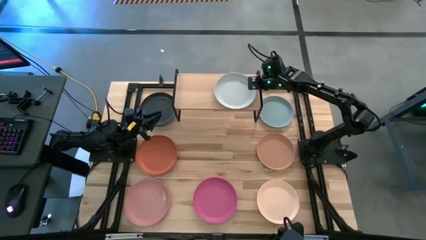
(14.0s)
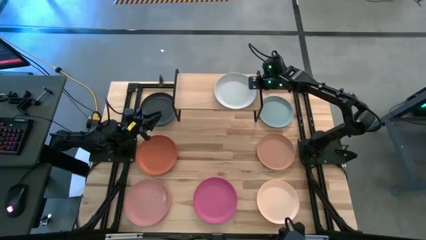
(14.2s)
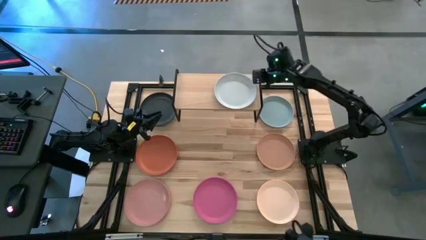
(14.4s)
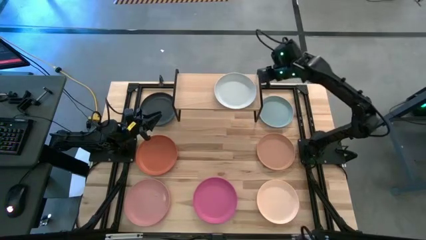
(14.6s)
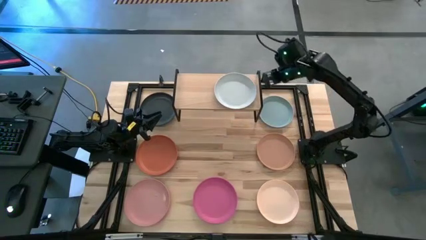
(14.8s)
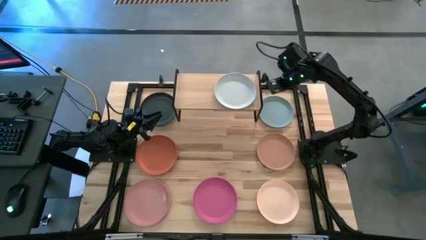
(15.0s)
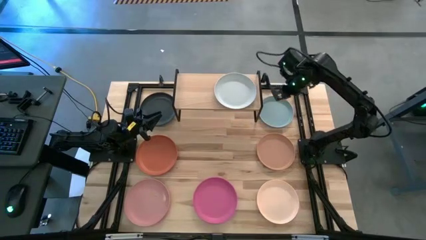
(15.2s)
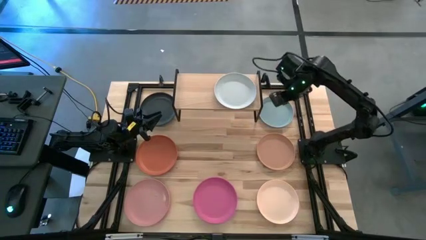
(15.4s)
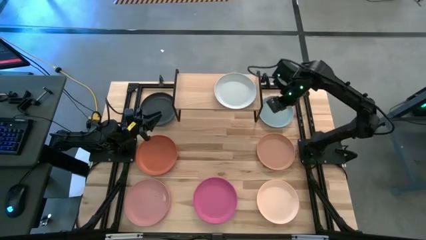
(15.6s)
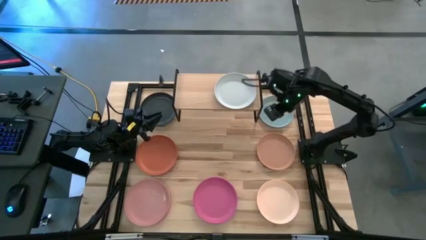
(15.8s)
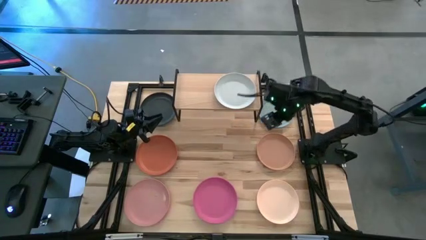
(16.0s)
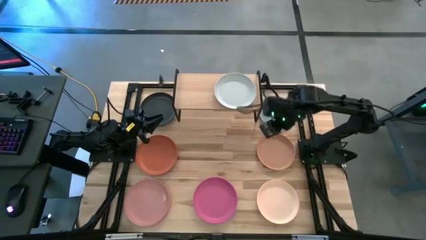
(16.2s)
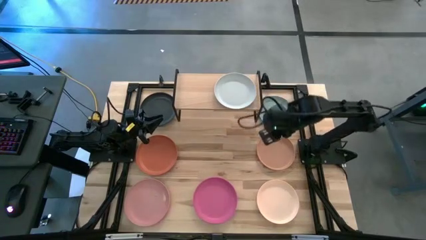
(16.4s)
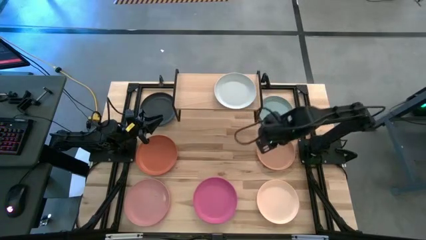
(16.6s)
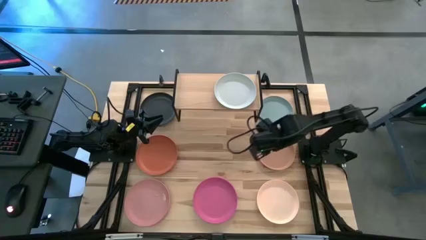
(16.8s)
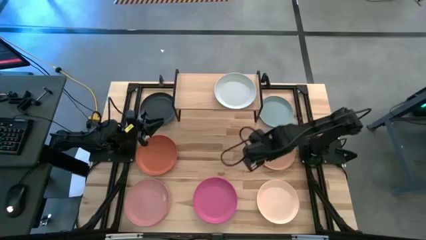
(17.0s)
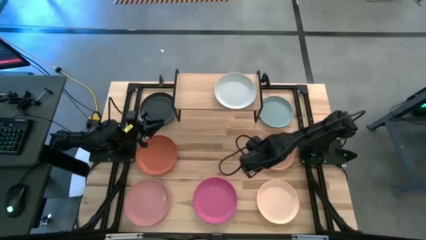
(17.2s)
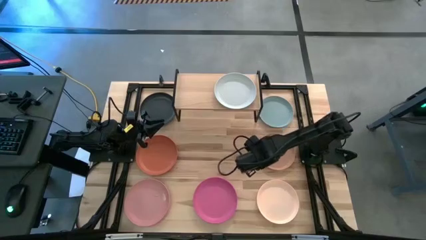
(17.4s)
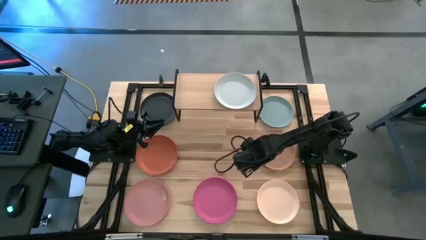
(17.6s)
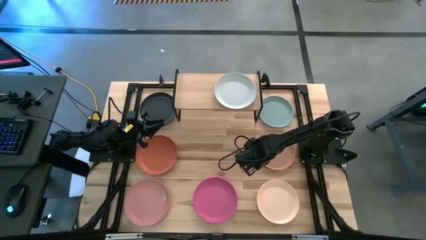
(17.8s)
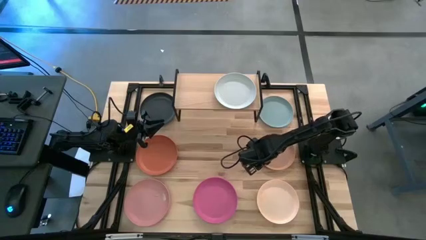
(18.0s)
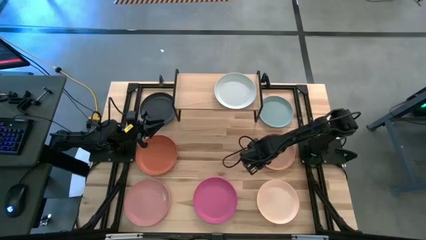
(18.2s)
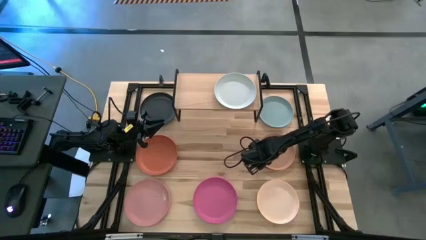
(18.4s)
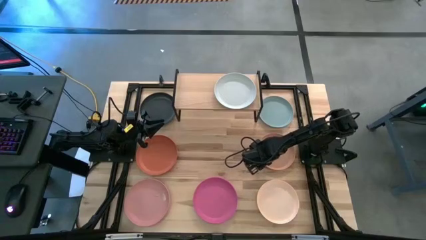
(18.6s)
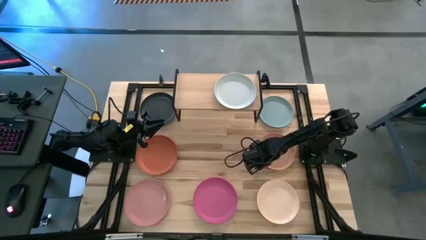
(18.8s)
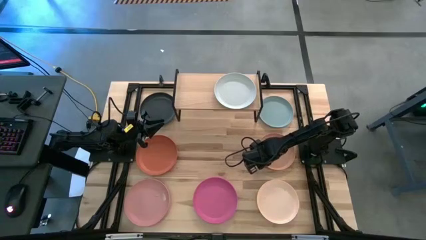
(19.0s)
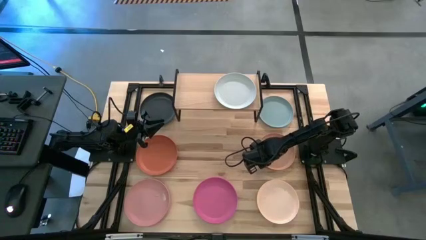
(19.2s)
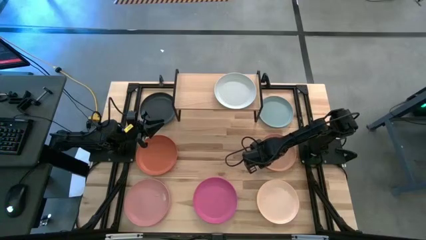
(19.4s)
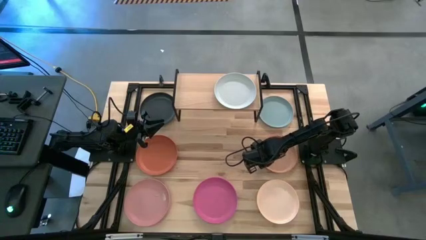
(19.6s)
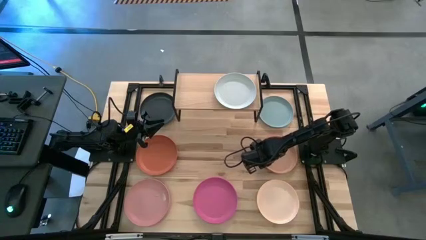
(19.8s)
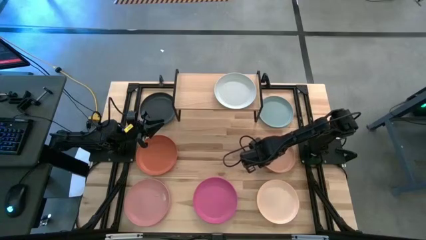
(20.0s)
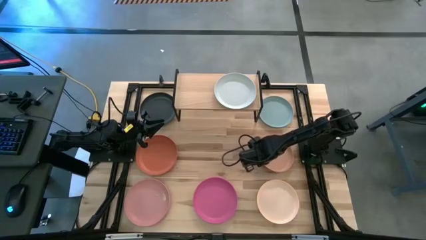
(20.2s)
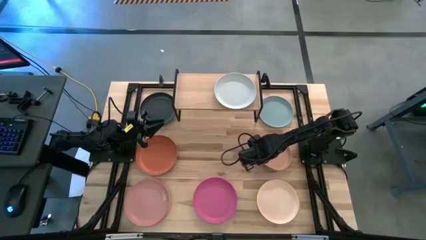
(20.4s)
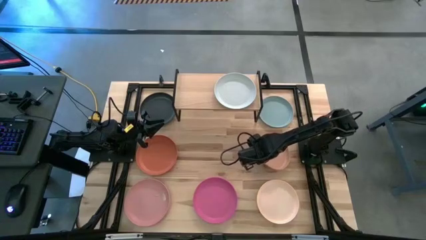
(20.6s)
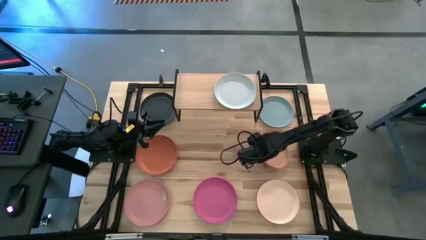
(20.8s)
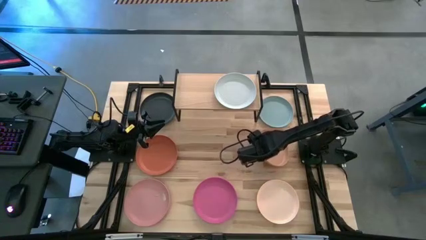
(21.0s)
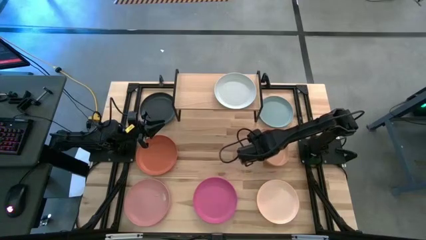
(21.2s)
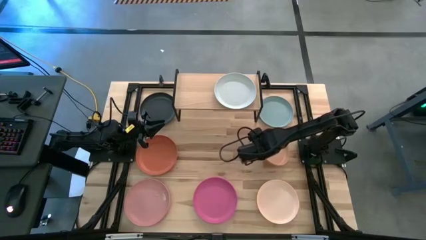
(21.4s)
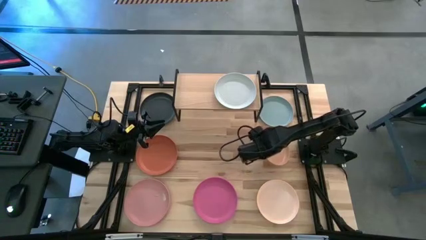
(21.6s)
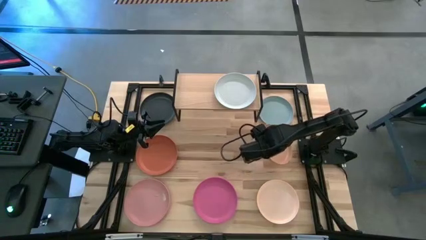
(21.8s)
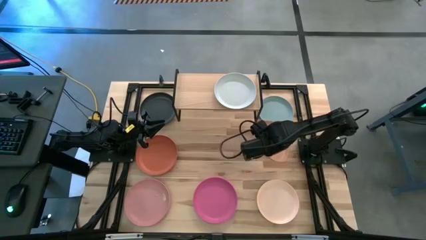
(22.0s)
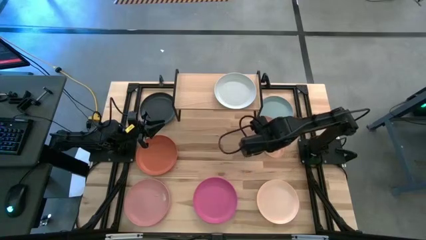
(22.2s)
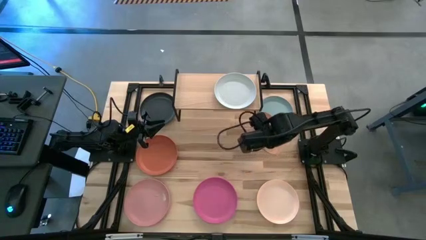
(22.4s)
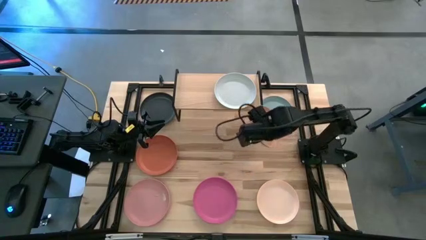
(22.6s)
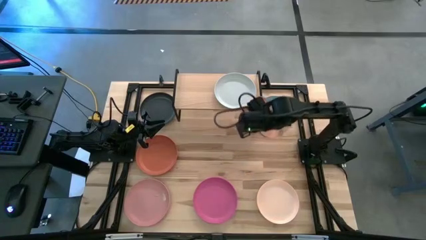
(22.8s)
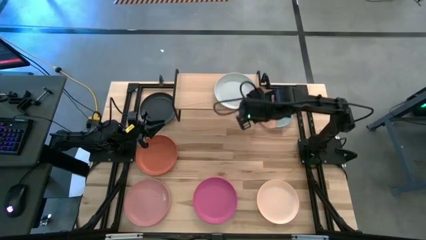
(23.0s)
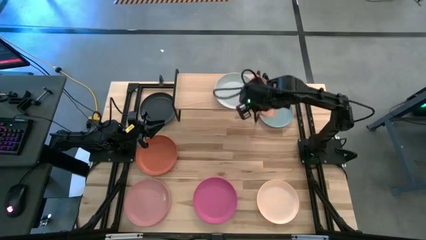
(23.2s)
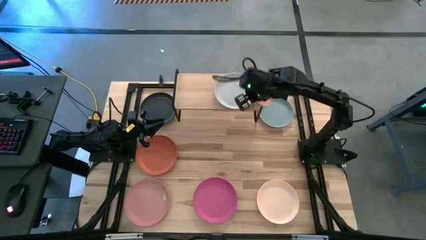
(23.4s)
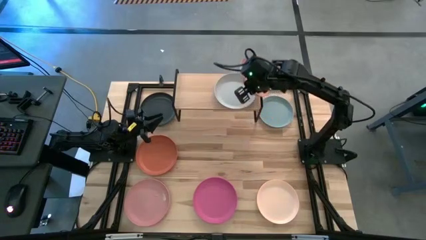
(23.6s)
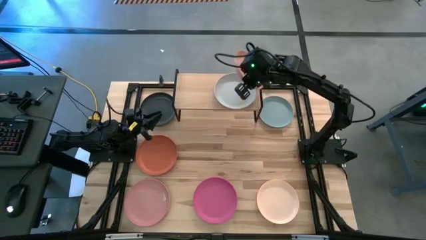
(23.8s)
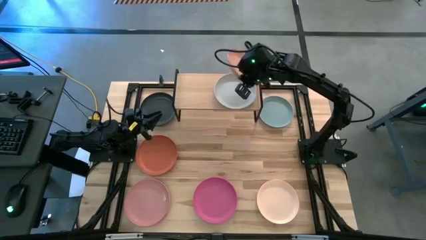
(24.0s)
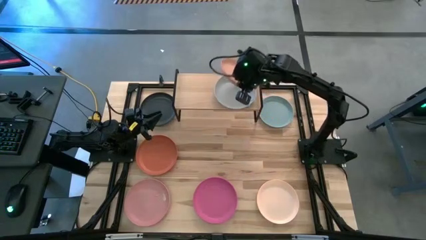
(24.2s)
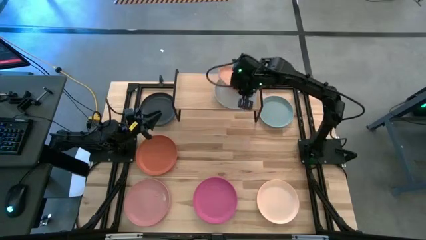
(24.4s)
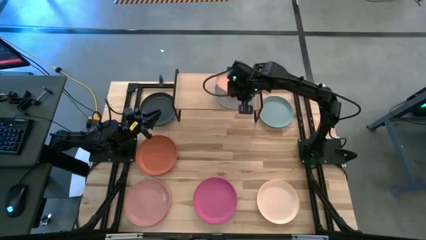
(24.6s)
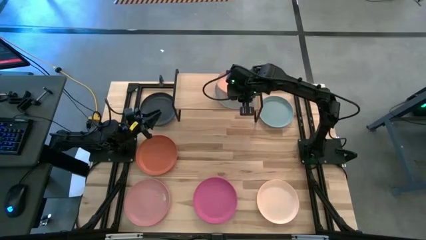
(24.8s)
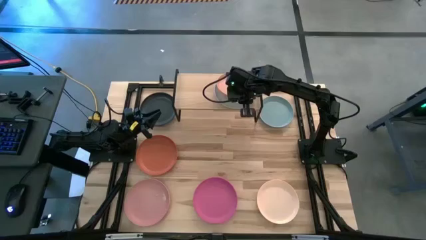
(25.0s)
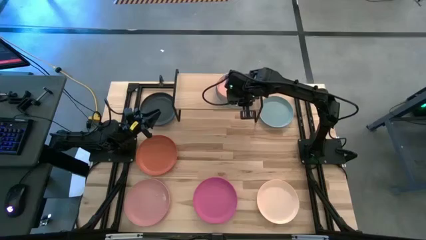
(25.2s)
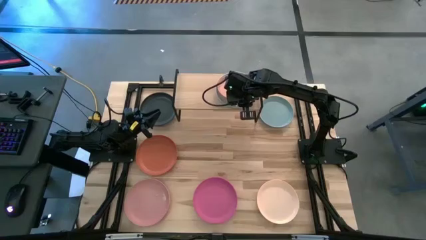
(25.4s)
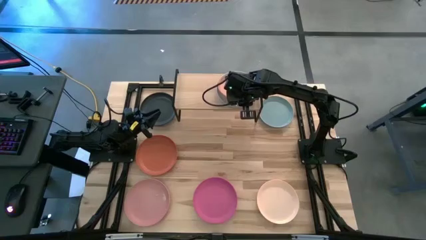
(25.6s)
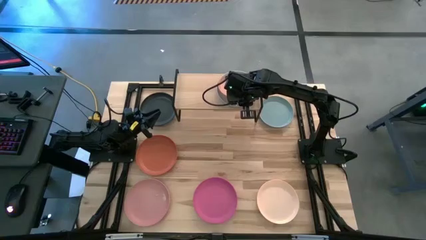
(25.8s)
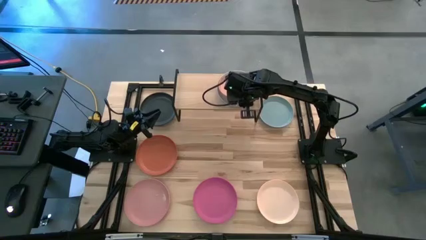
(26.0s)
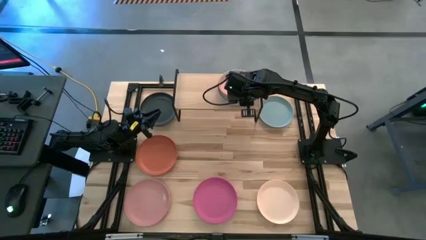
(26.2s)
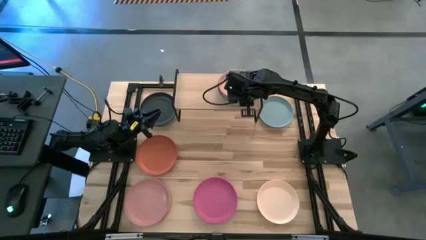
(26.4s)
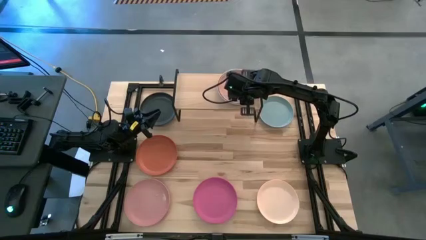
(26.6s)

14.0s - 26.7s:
Task: Place and stack plates onto a shelf
Stack the brown plate on top of the white plate on the shelf

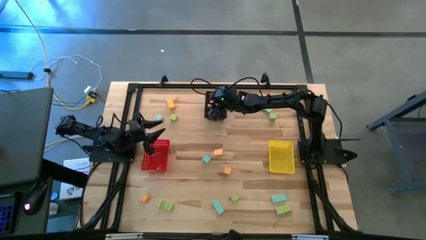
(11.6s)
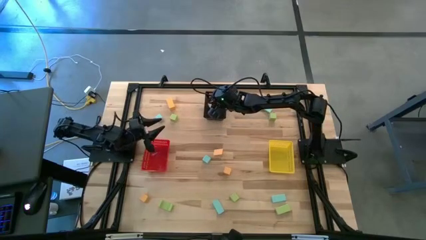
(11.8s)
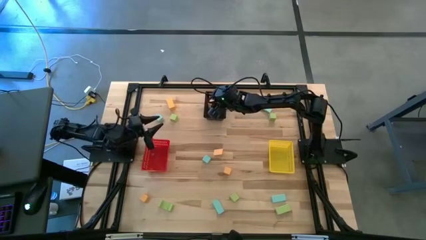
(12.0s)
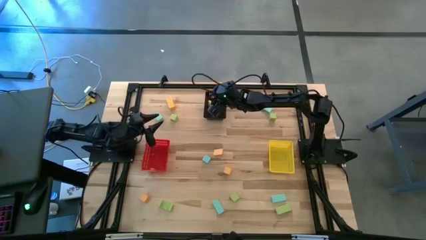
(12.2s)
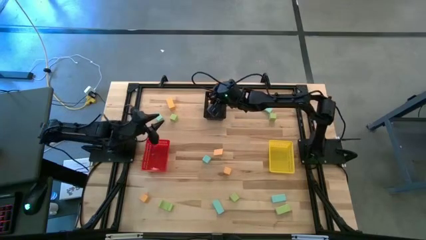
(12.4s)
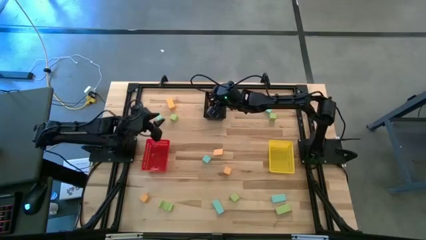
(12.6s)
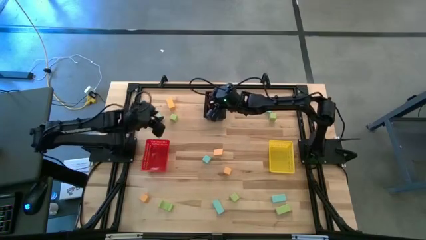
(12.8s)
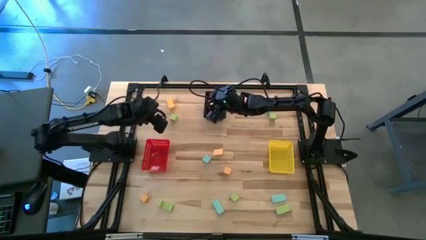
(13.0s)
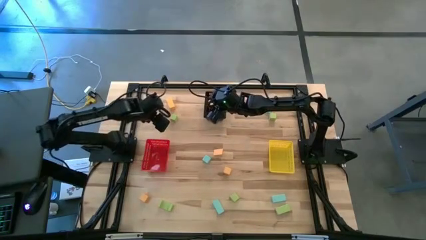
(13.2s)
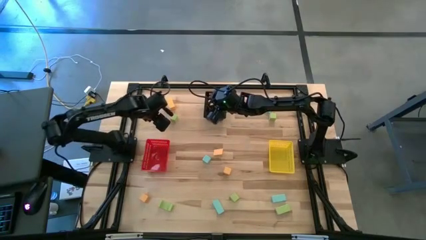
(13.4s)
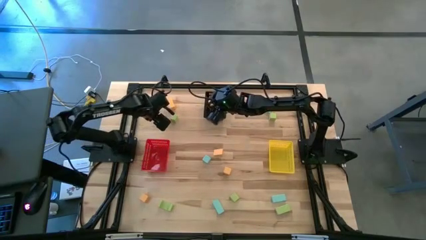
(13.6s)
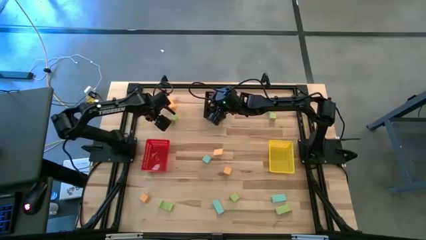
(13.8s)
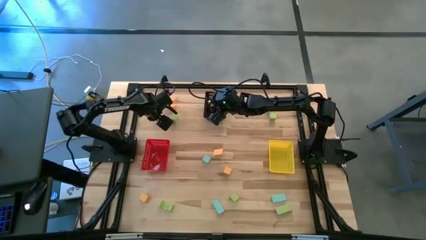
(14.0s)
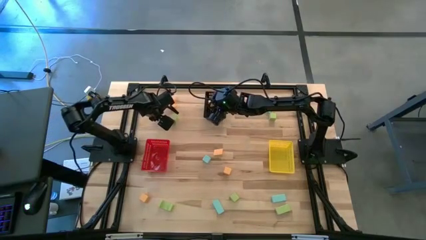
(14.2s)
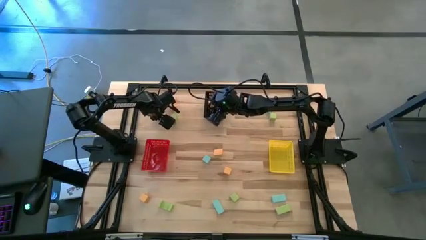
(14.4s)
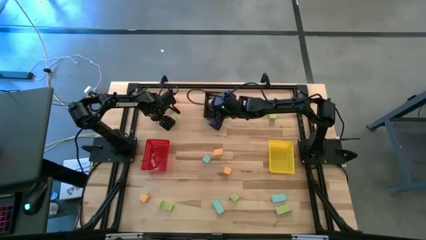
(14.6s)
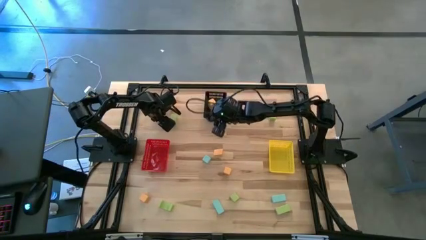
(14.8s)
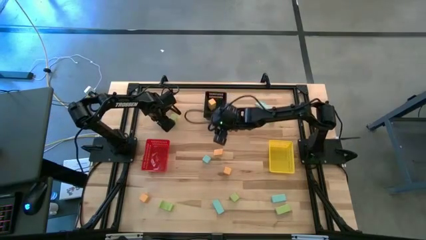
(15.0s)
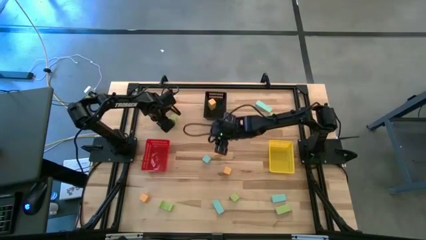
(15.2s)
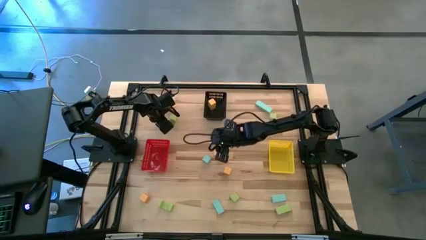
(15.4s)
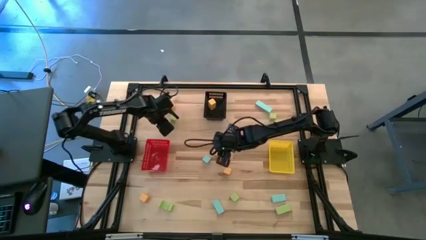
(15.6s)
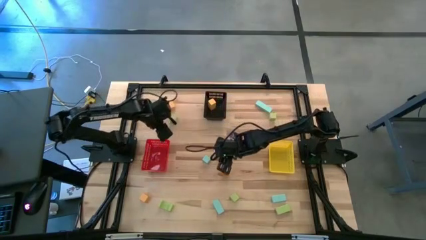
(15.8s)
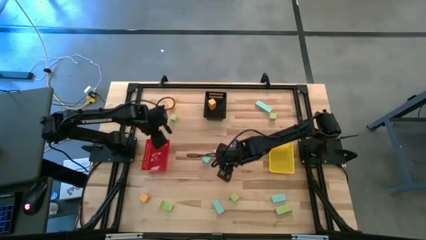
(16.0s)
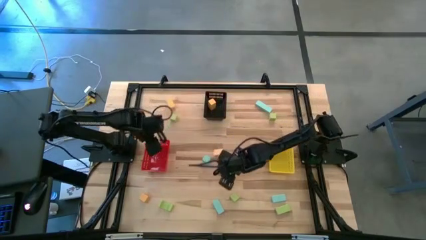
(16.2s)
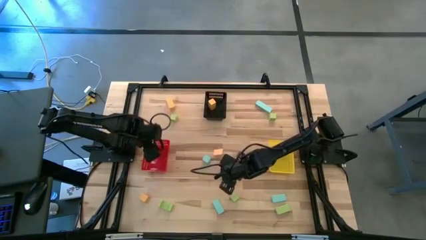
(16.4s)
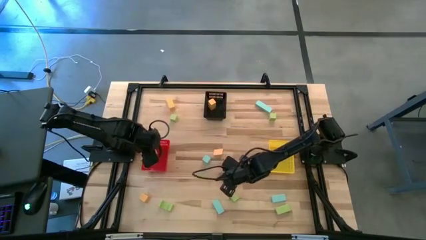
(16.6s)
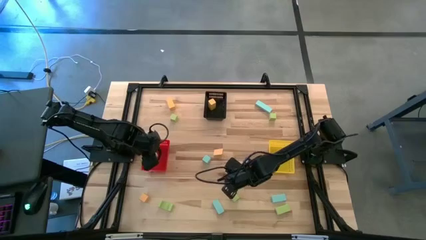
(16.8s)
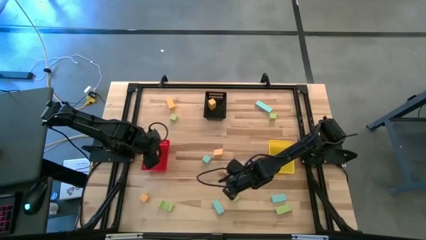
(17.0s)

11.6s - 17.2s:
Task: Sort & place blocks by color
Put the blue block into the red bin
